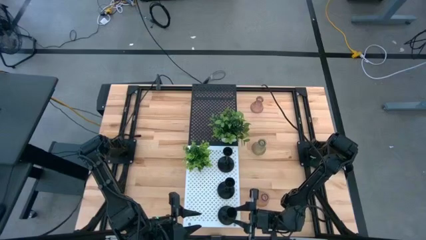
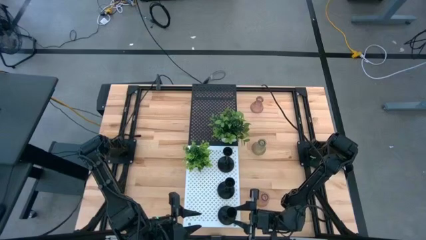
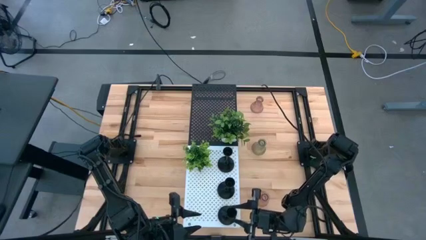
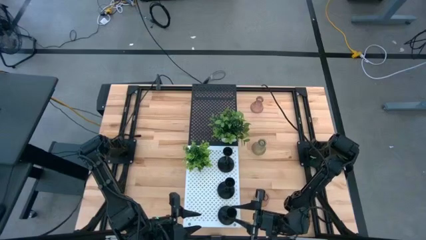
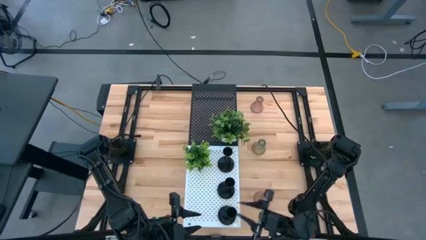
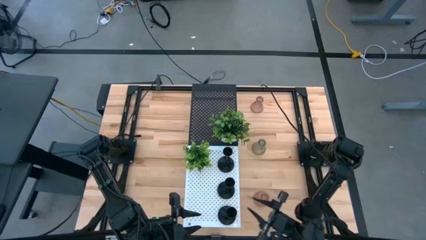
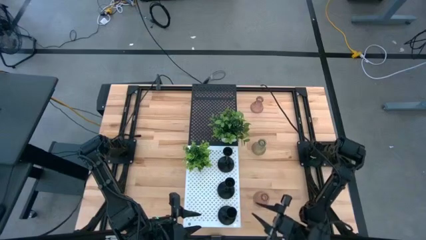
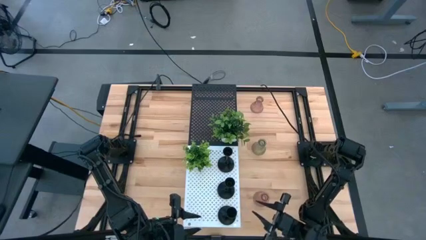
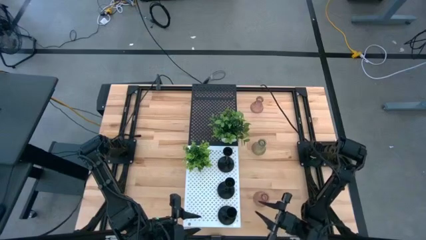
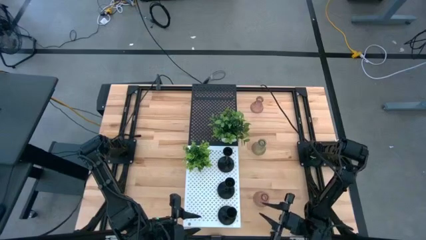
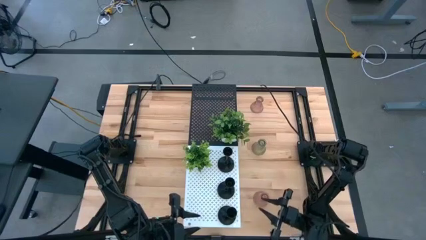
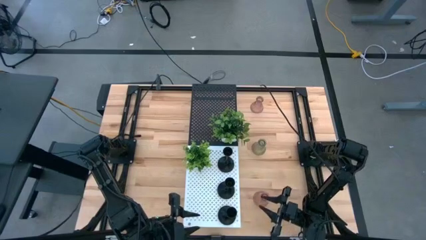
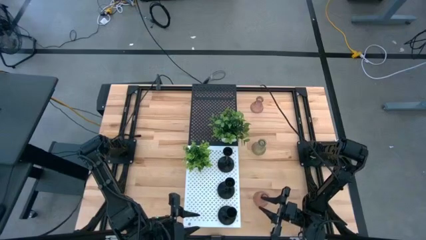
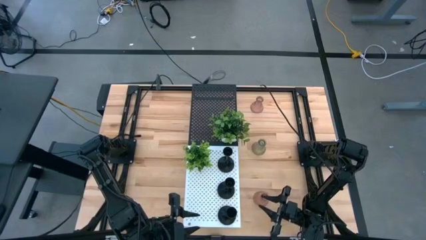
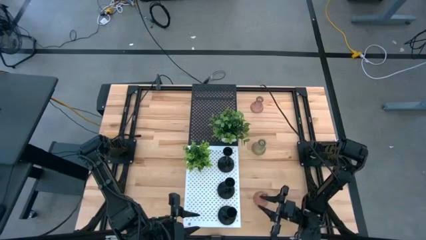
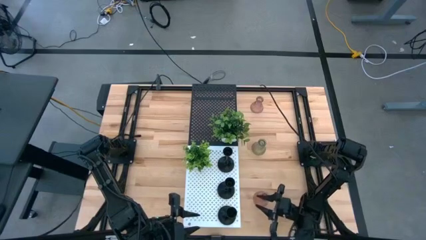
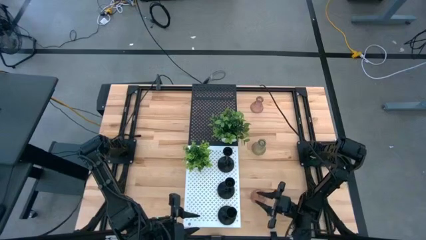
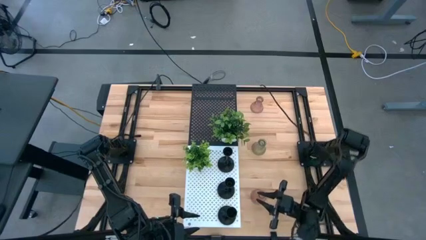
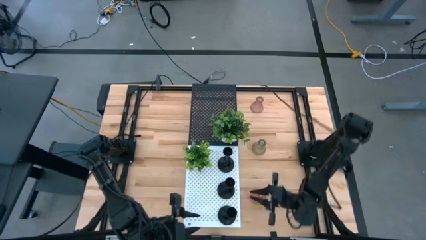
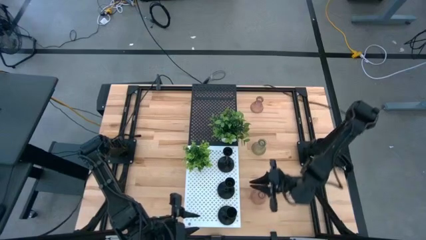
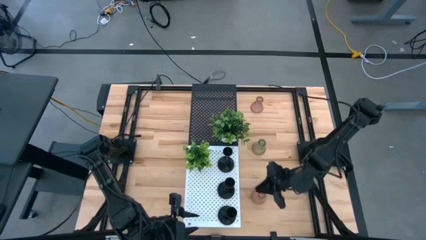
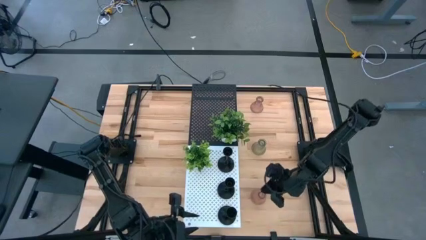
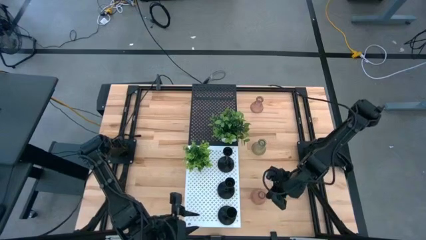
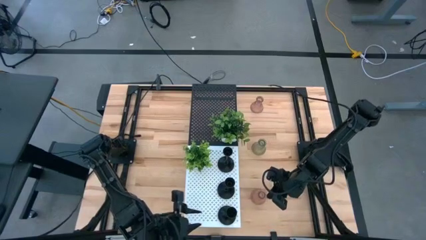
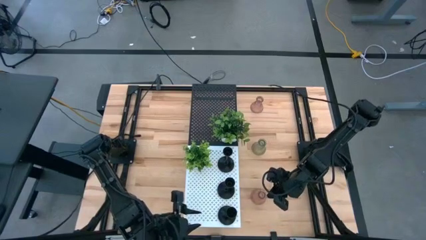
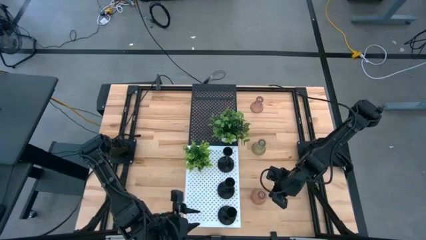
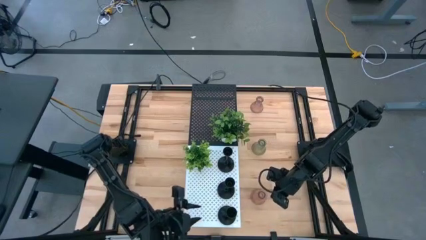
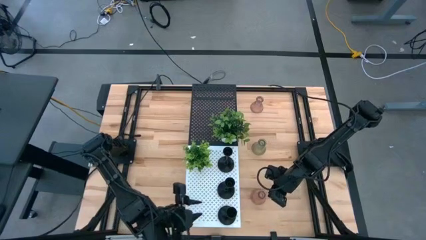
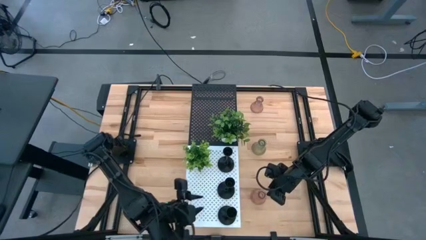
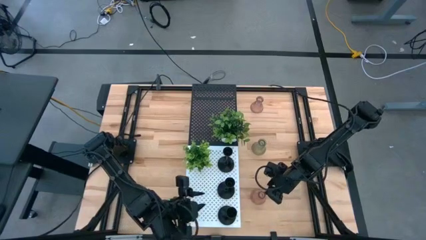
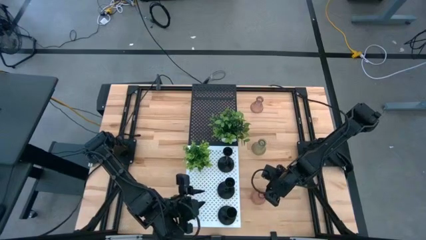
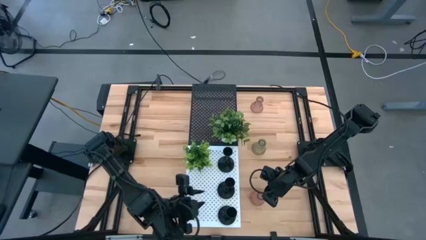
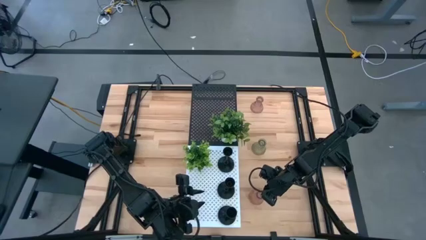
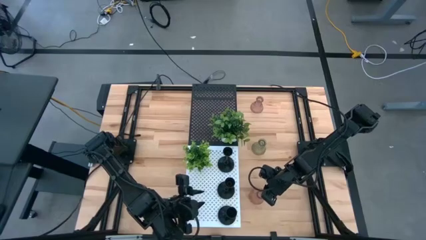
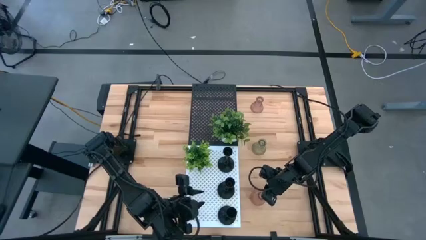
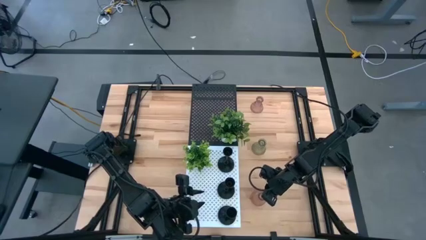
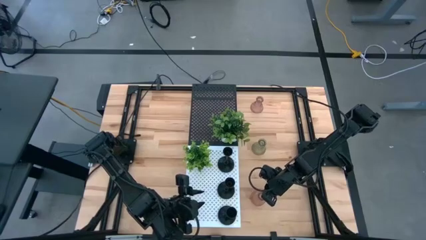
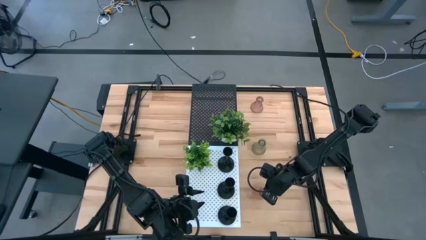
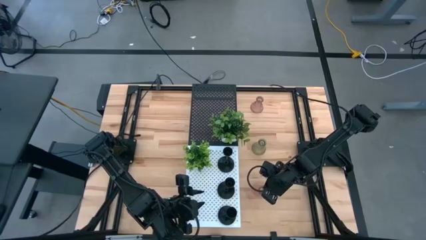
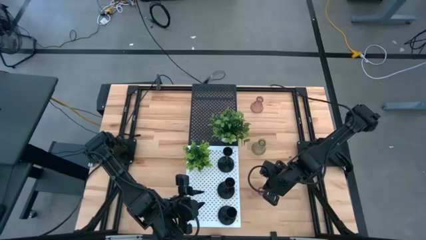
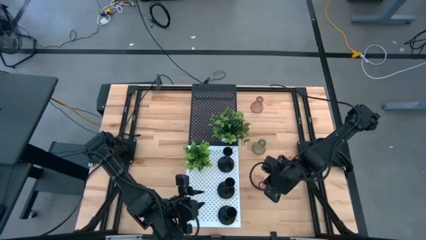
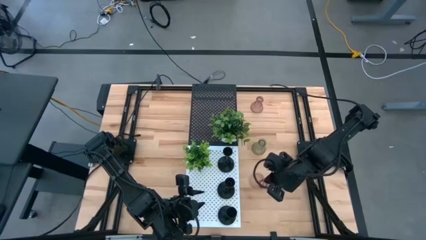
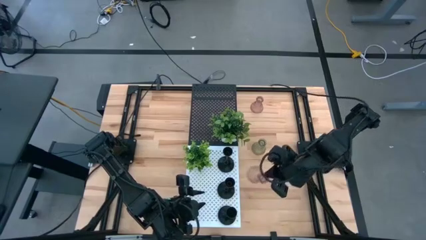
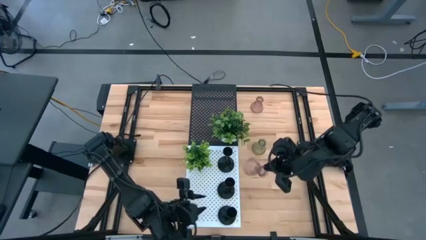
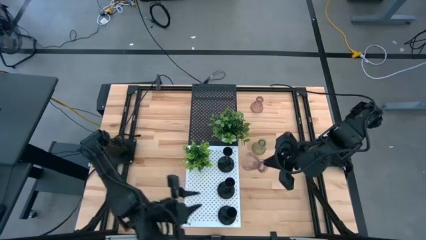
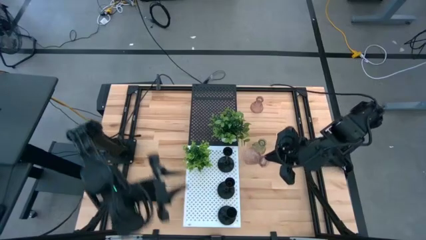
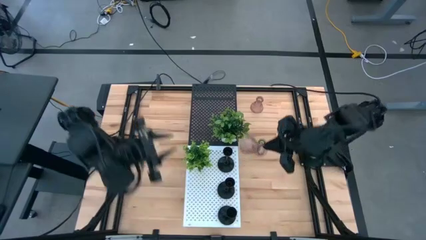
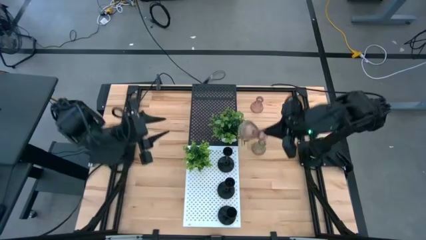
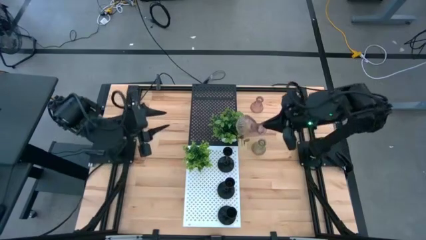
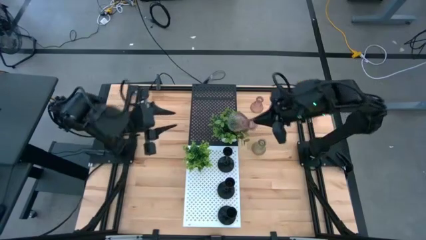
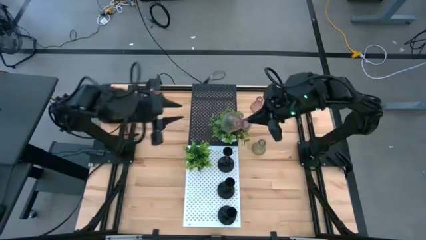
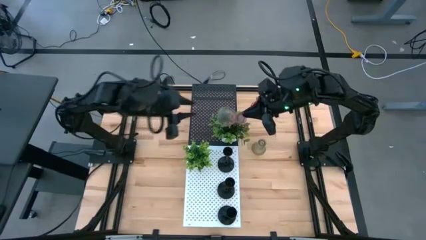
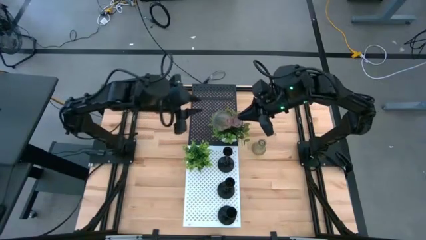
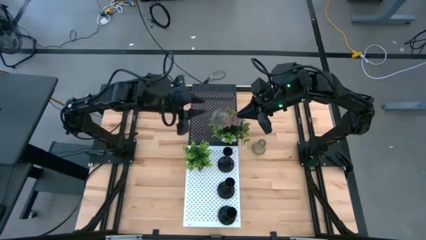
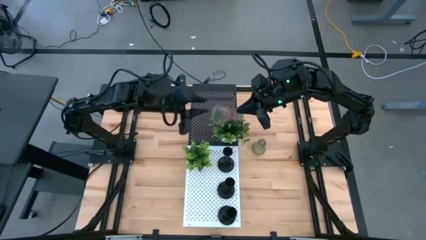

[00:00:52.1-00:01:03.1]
Task: Pick & Place candle stick holders
Put the bottom pink glass candle holder on the black shelf

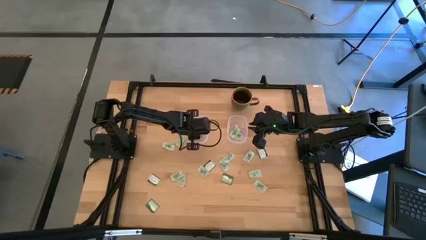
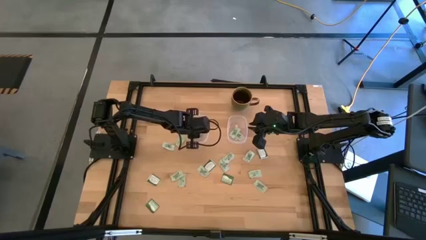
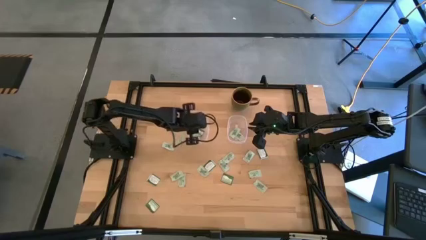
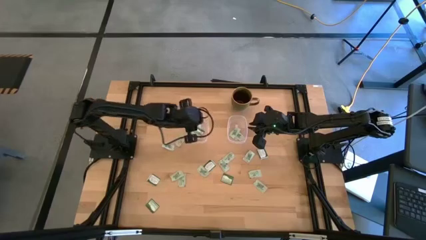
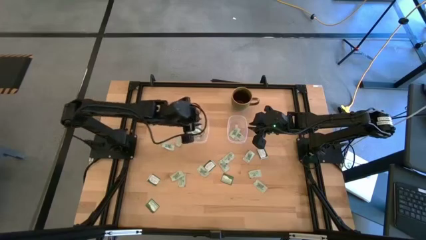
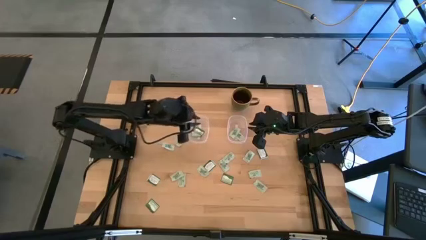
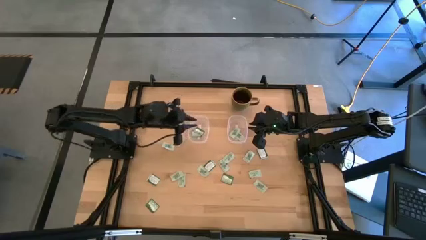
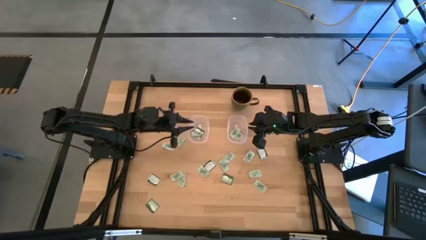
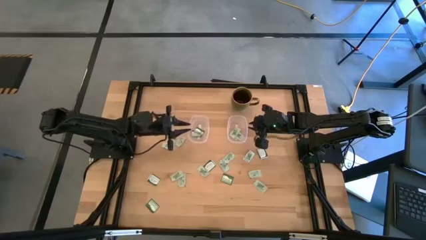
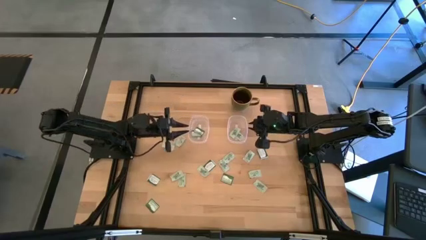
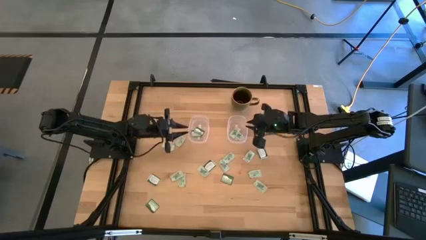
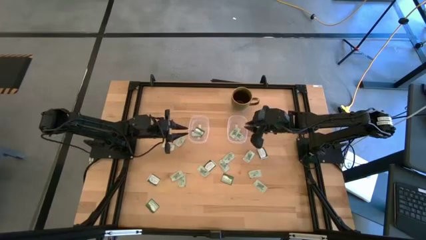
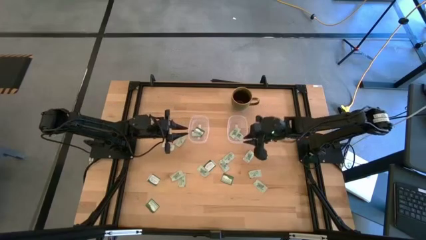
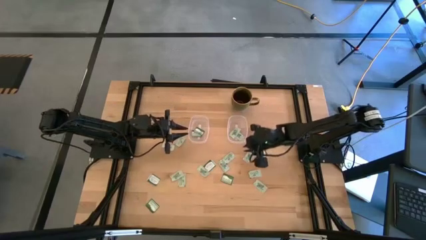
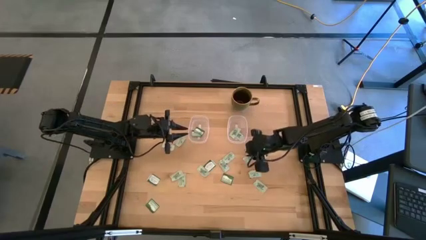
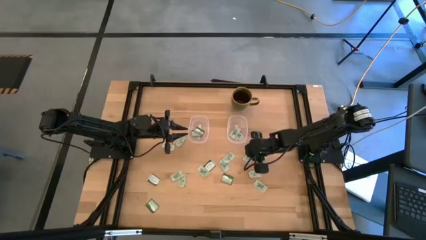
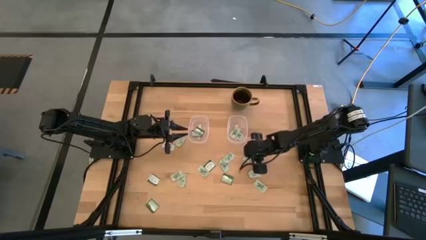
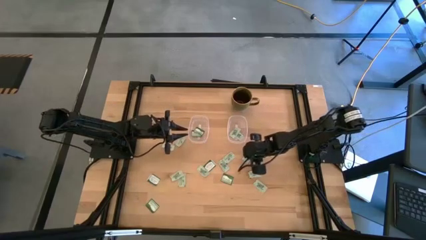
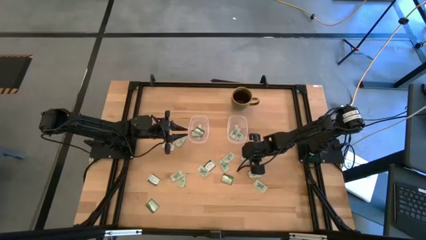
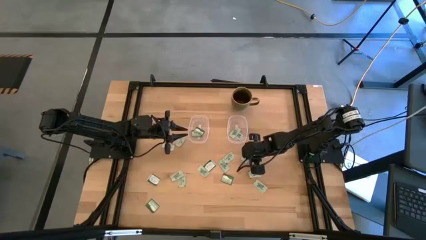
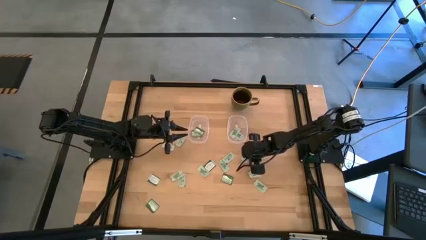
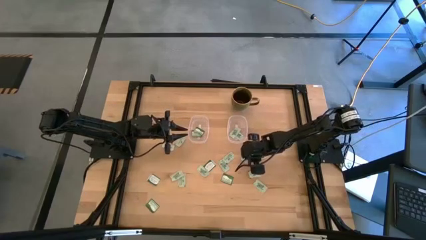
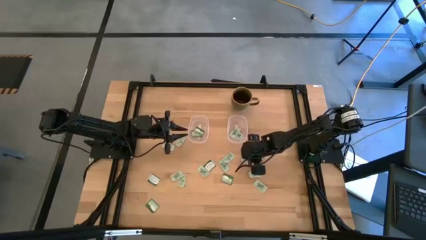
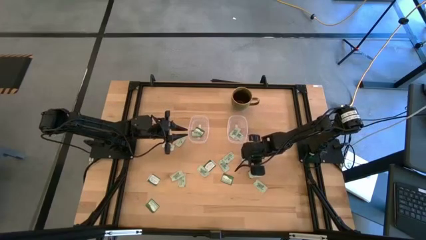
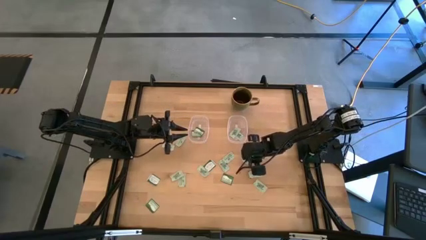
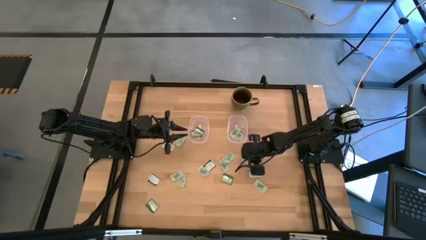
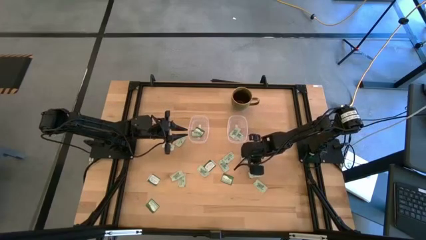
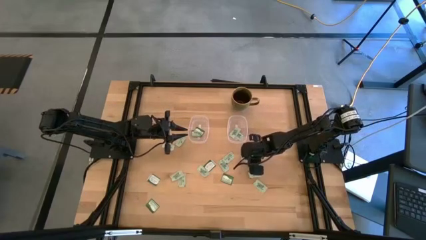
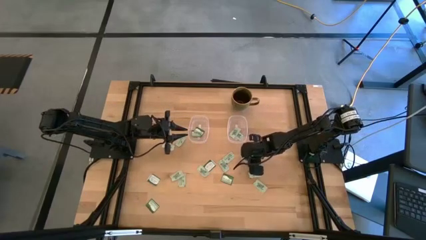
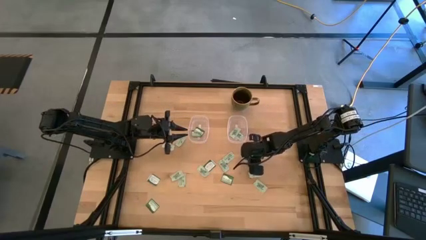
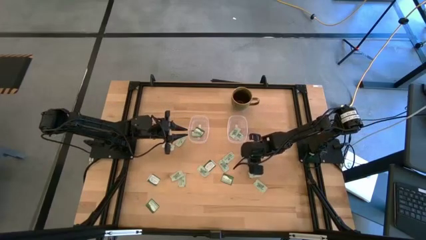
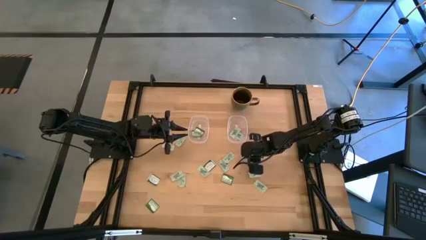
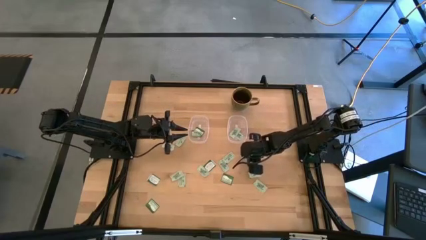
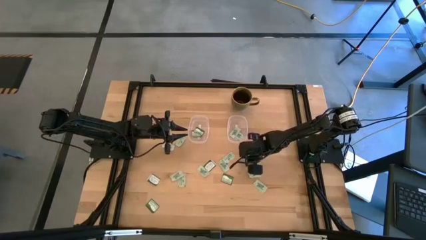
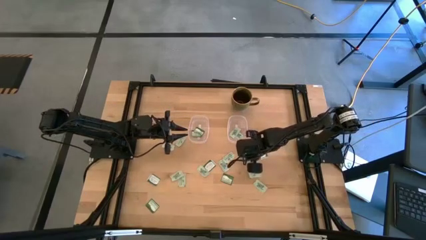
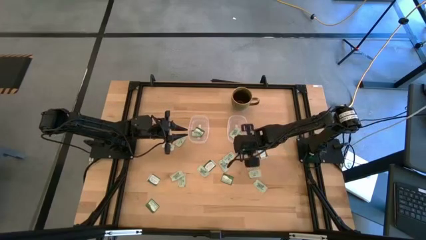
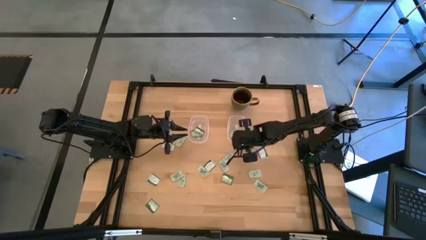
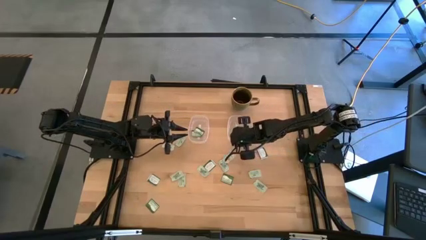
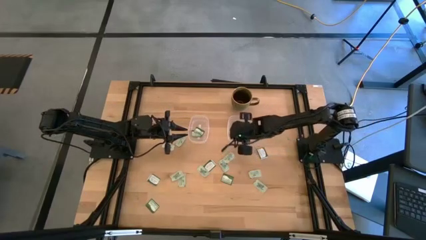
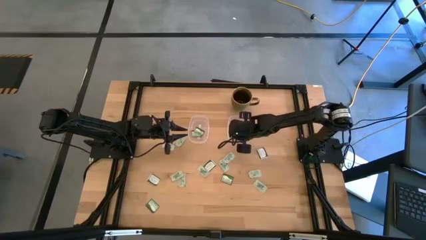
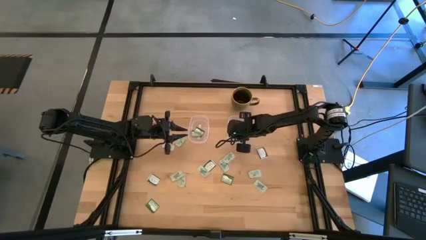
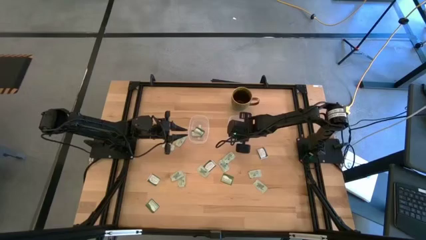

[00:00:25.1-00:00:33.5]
Task: Pick and place items into bin
Put the stevia packet into the right transparent bin
